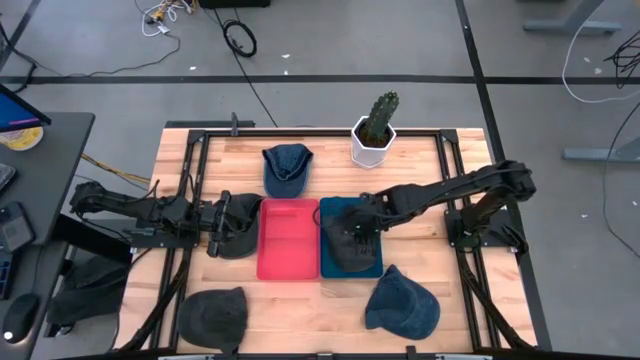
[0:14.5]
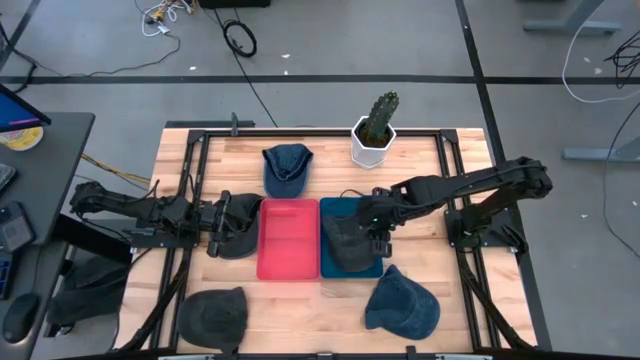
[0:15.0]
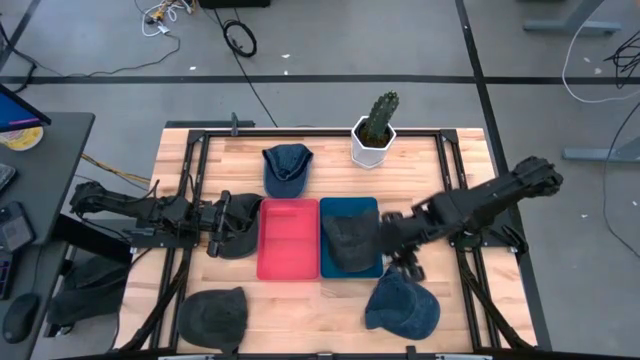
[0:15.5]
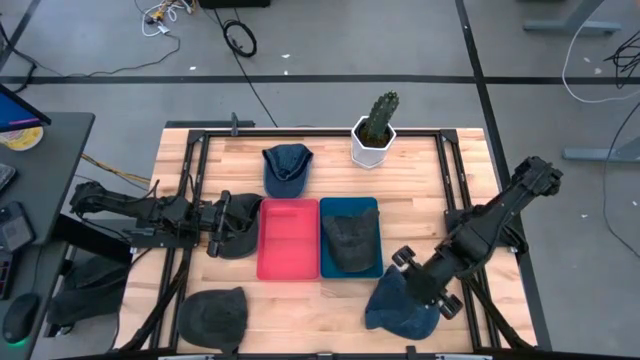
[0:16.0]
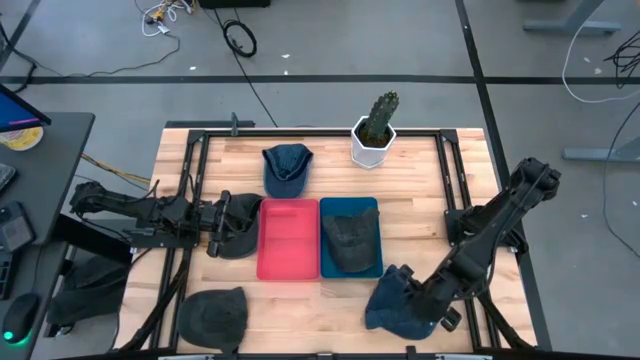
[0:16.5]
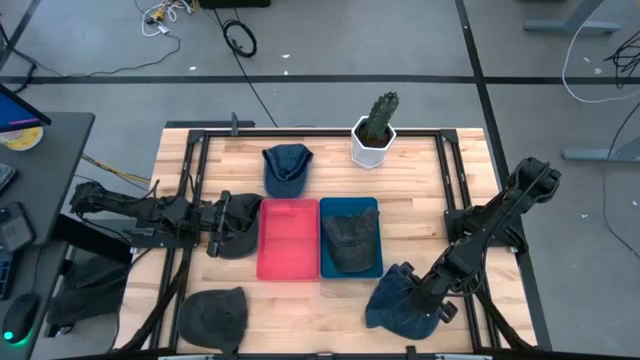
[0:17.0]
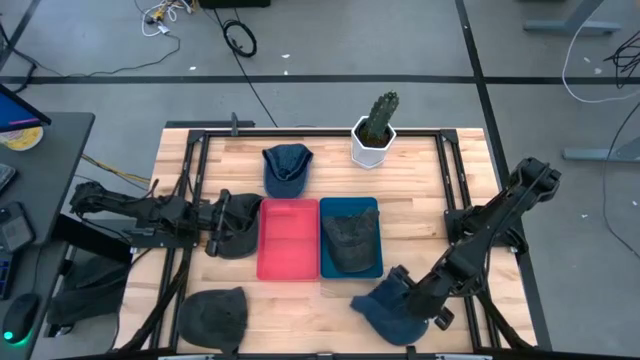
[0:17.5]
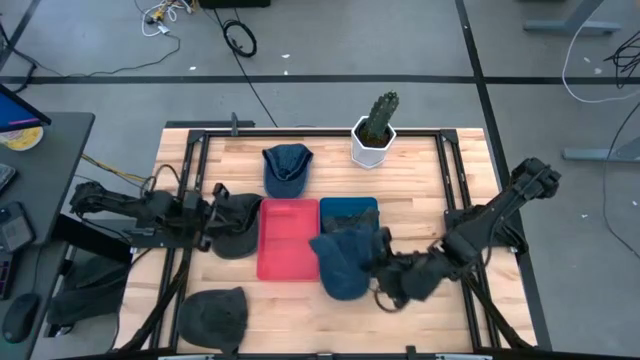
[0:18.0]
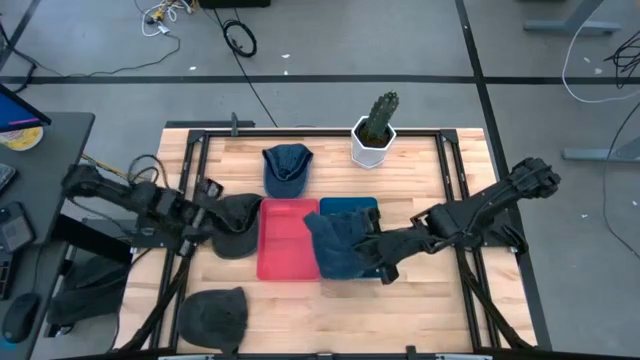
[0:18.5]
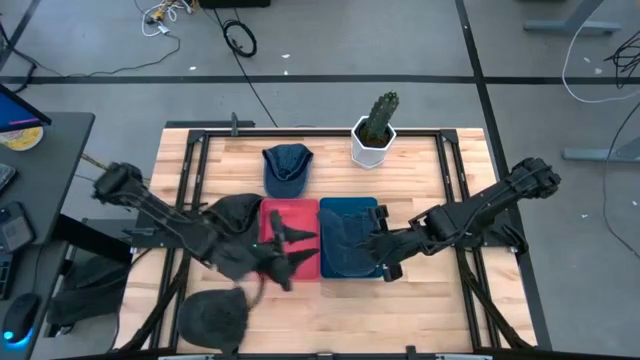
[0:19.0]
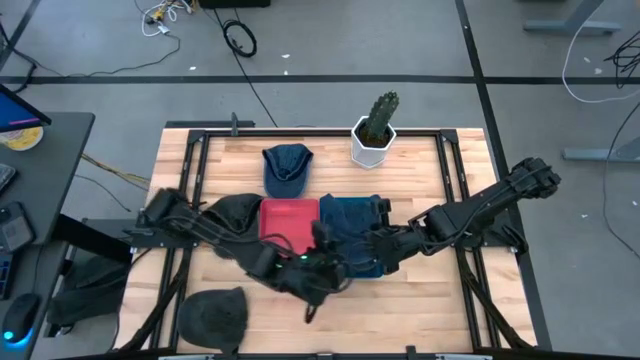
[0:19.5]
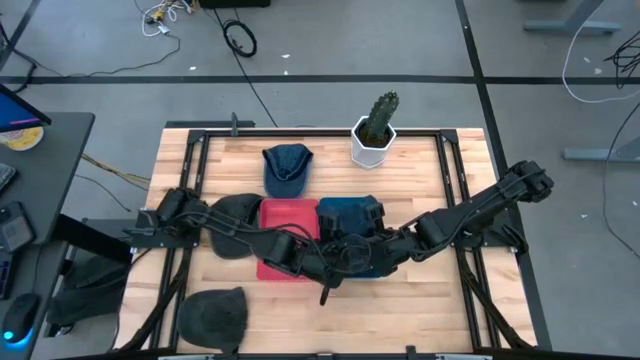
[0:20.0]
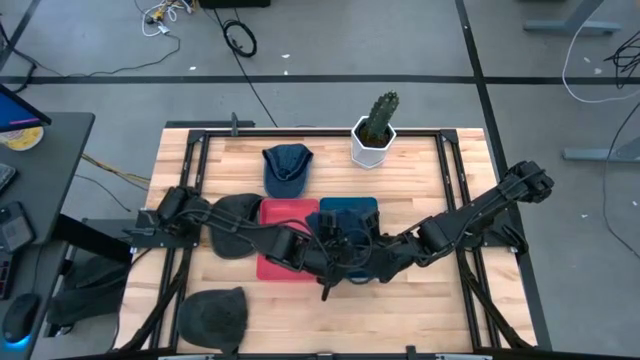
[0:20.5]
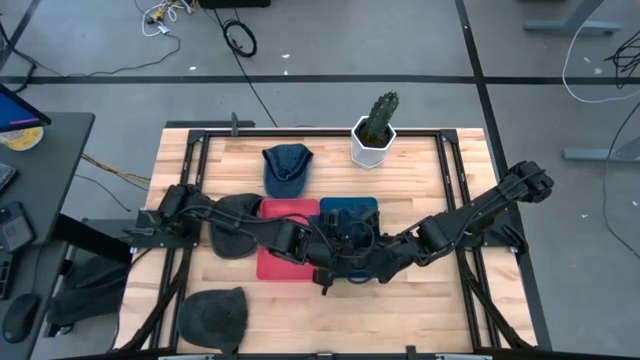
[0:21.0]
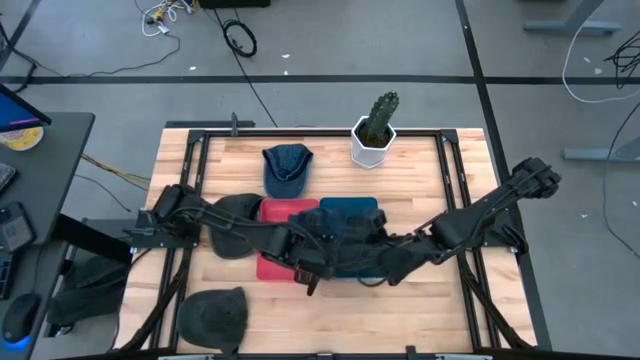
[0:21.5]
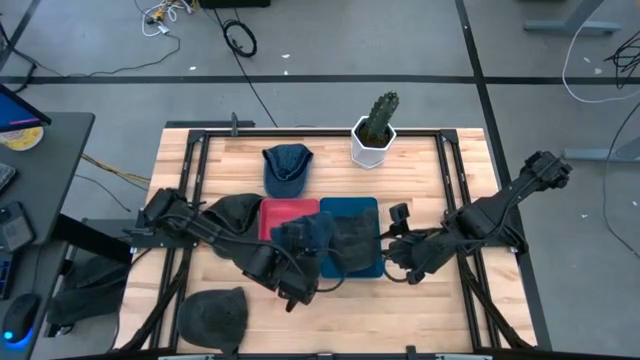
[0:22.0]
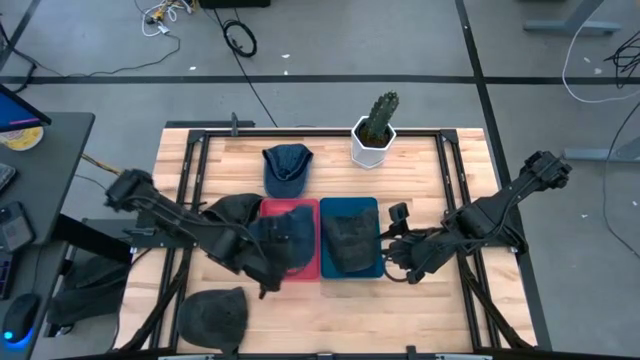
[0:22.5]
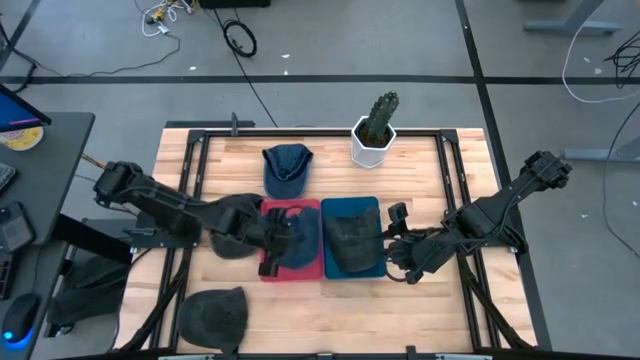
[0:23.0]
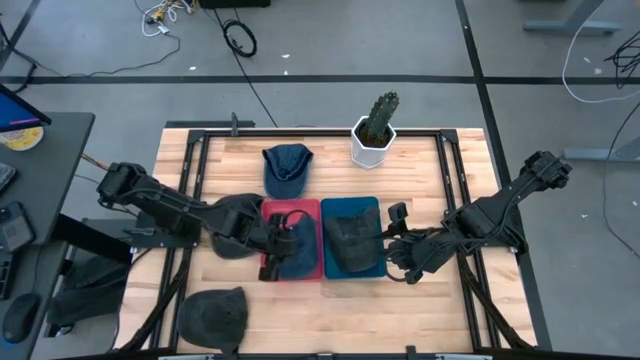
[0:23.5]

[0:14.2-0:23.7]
Task: Pick & Place hat
Put the bottom right dark blue cap into the red bin

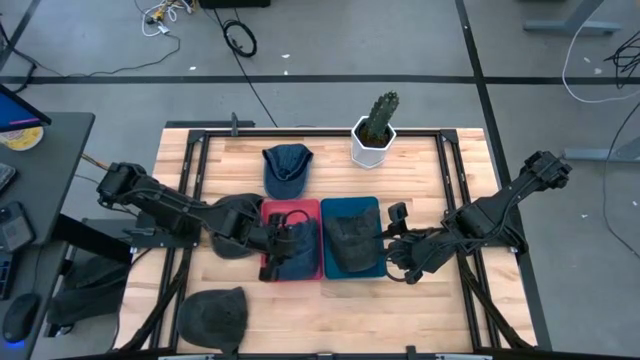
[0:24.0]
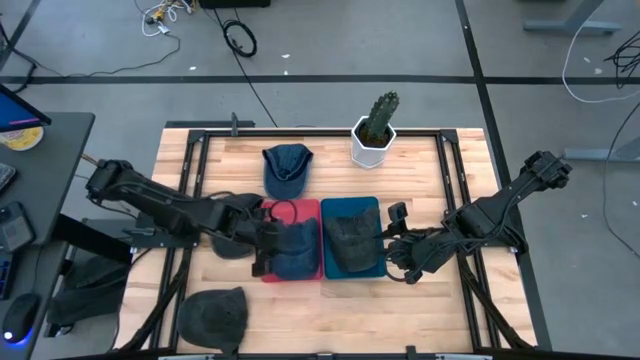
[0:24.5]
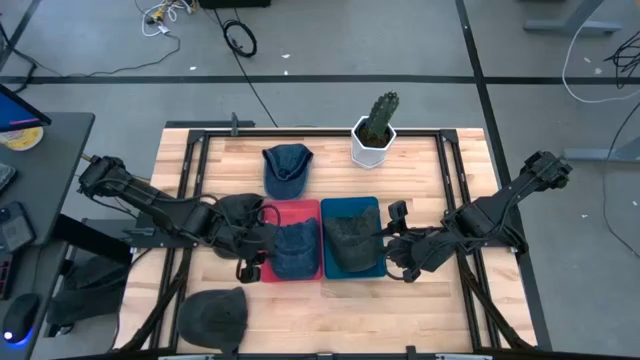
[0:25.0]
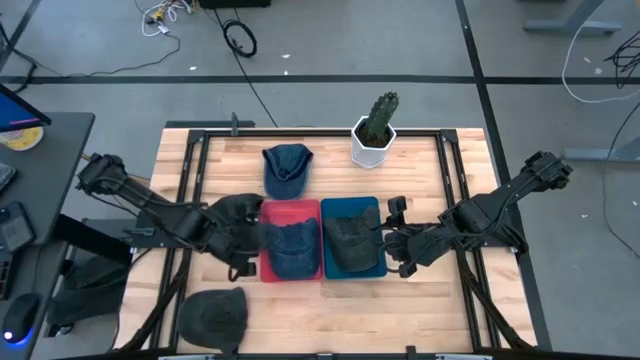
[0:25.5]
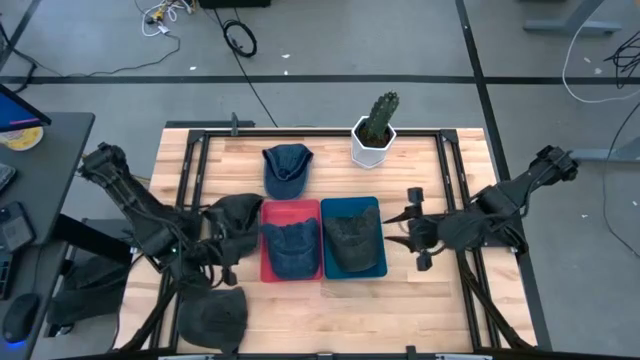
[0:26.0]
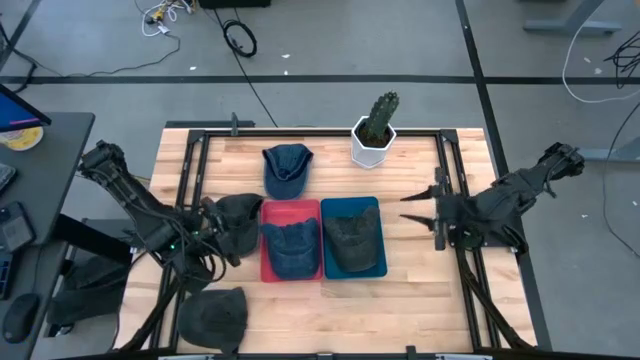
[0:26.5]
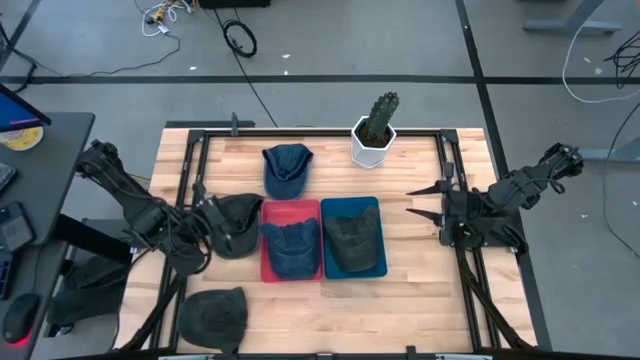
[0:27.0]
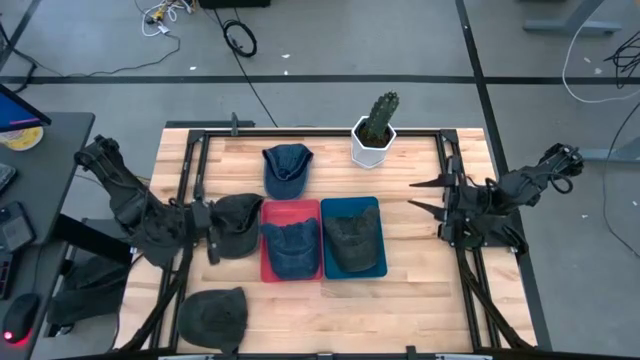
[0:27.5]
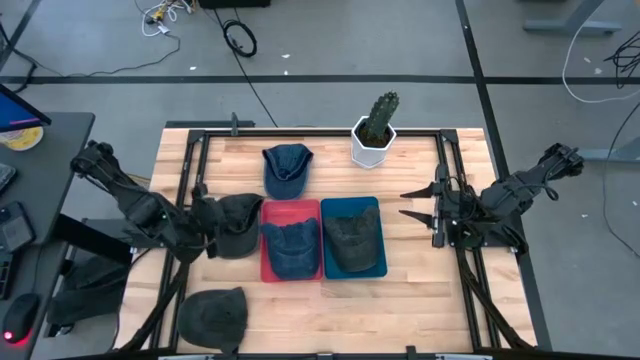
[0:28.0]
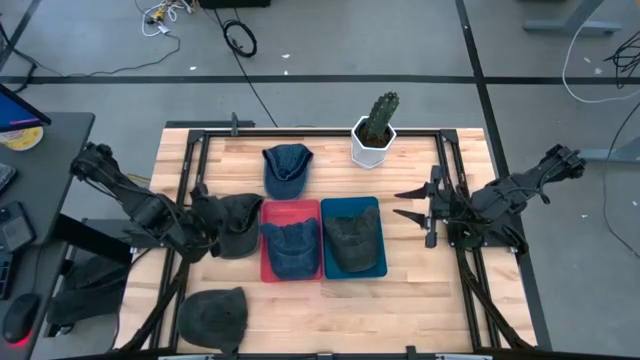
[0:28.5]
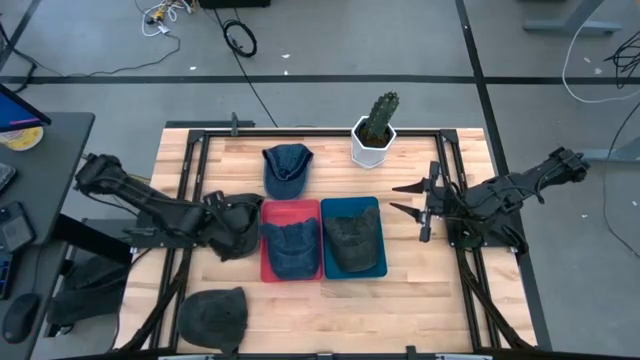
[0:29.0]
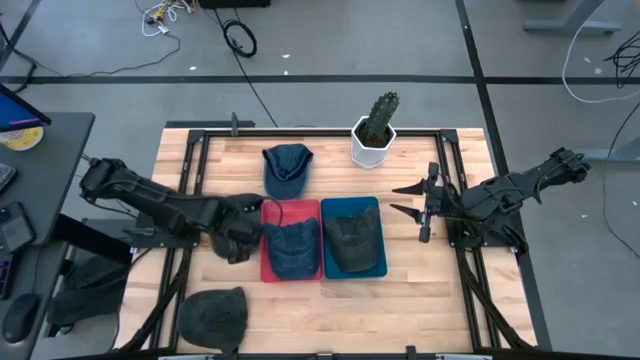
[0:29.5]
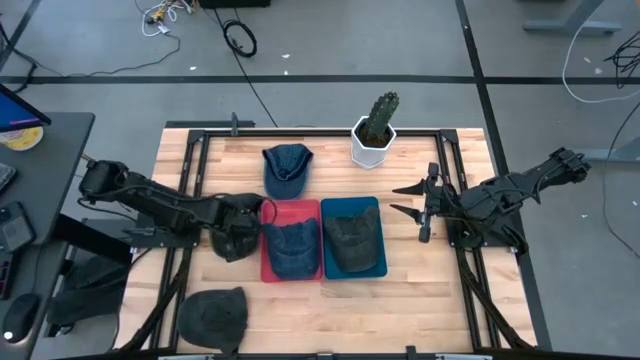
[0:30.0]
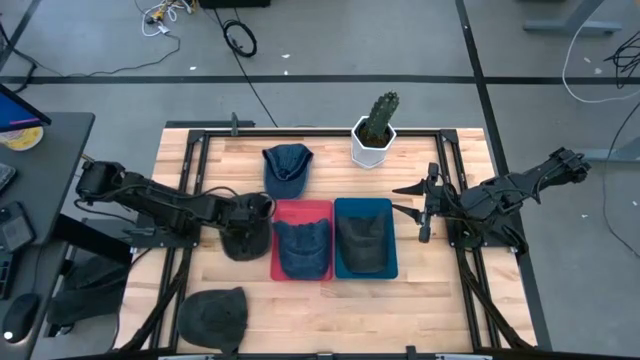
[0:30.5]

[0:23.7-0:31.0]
Put the top gray cap into the blue bin

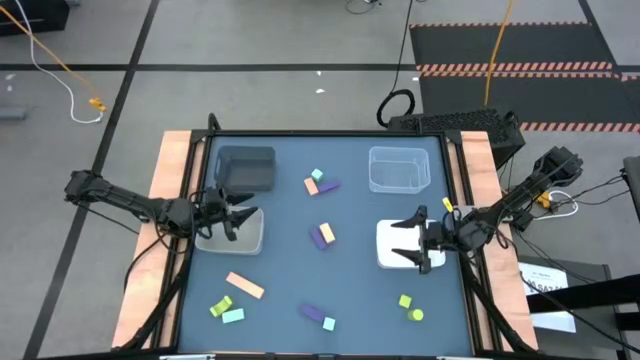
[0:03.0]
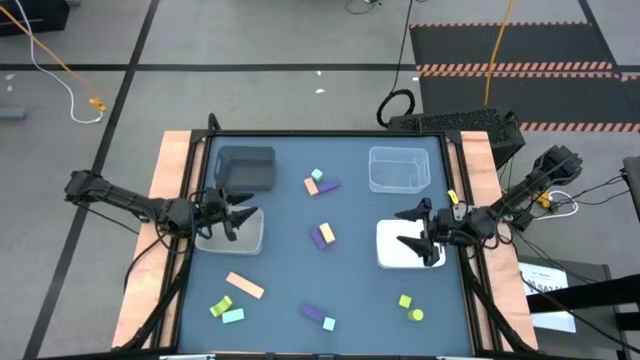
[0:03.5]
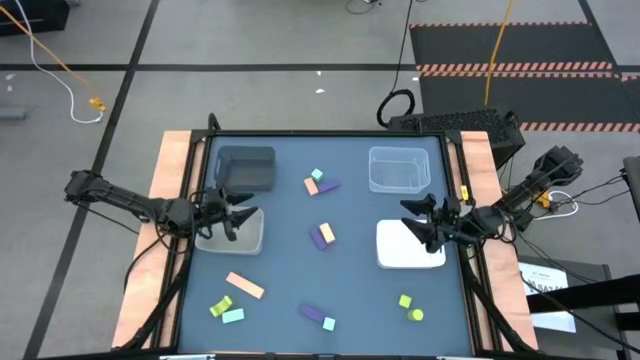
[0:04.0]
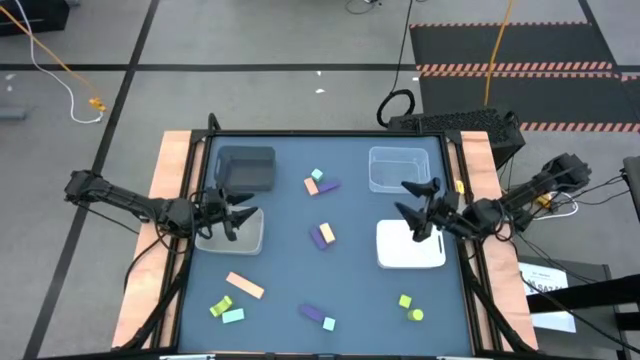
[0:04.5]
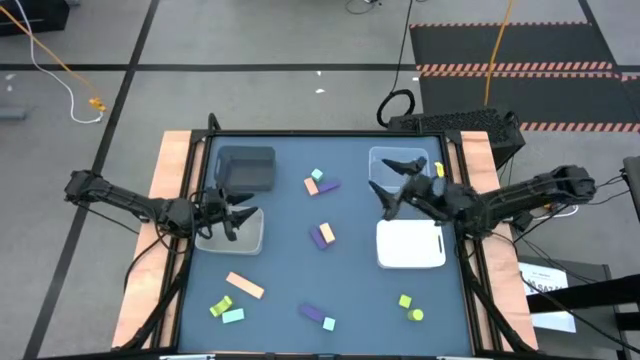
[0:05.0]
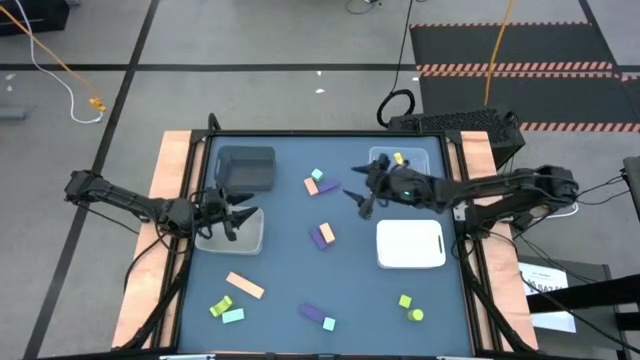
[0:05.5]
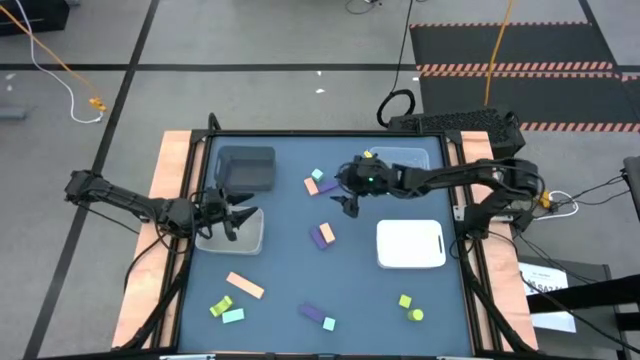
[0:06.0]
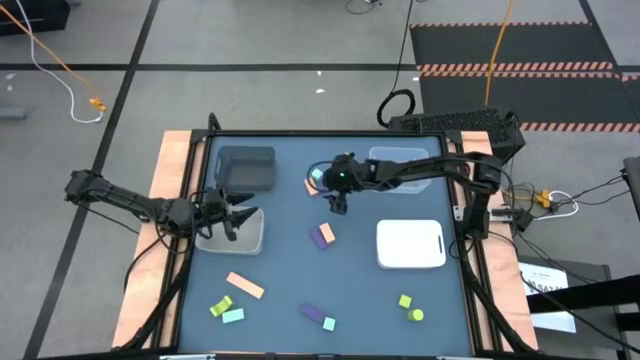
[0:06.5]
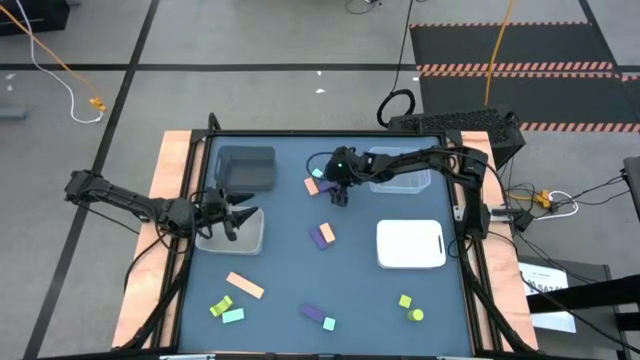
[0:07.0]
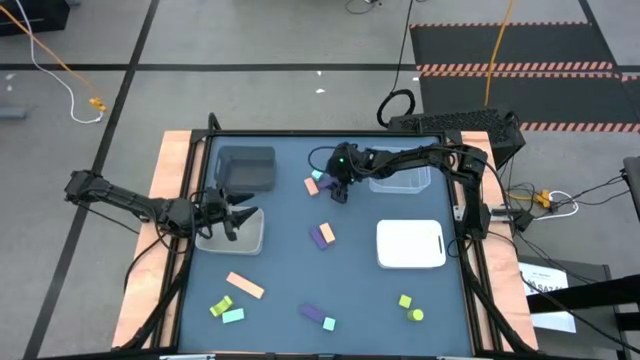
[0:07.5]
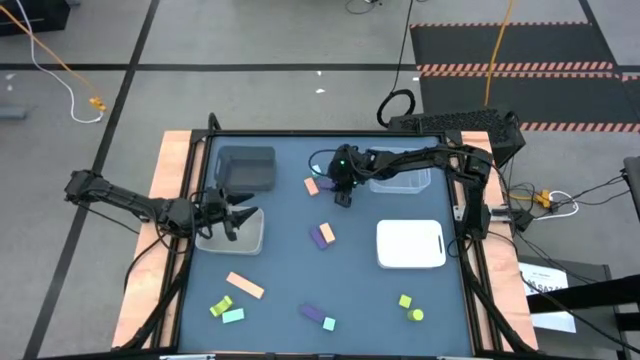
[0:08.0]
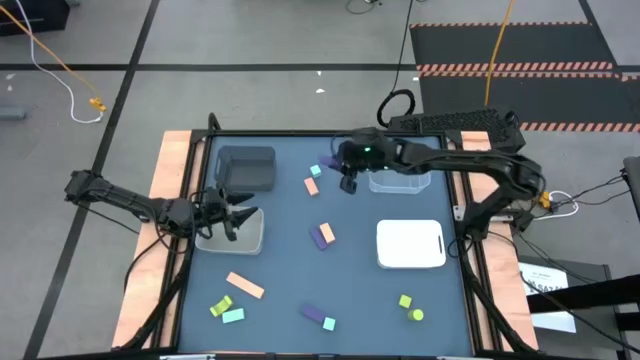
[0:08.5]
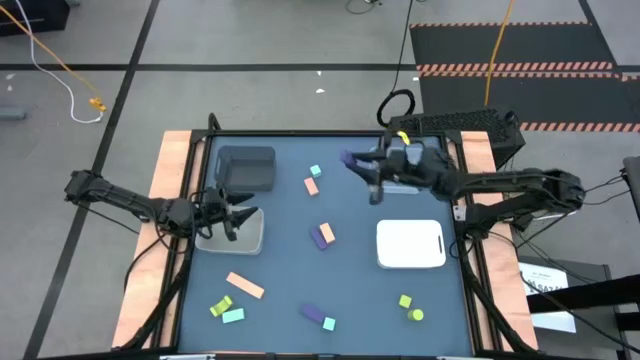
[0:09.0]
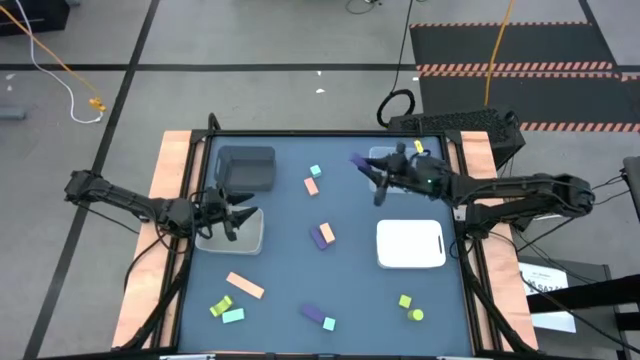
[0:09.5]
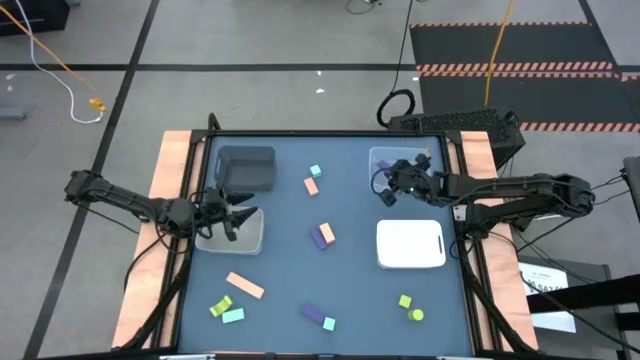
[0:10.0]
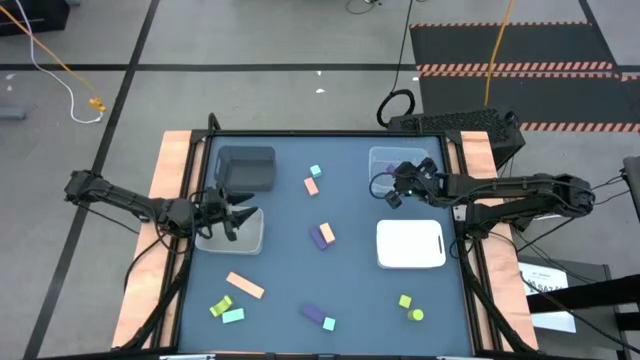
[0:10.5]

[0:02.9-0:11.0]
Task: Sort & place blocks by color
Put the top purple block into the transparent bin
